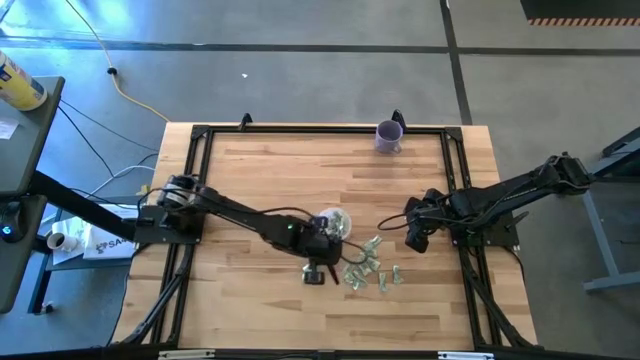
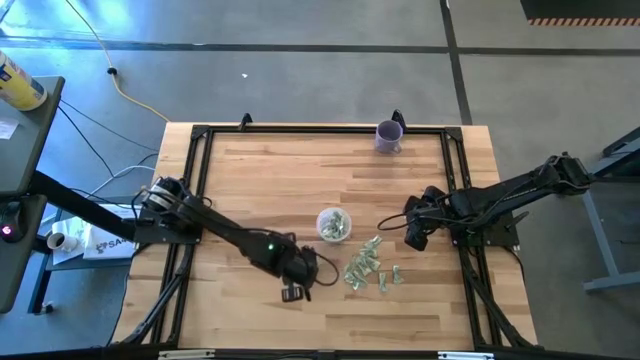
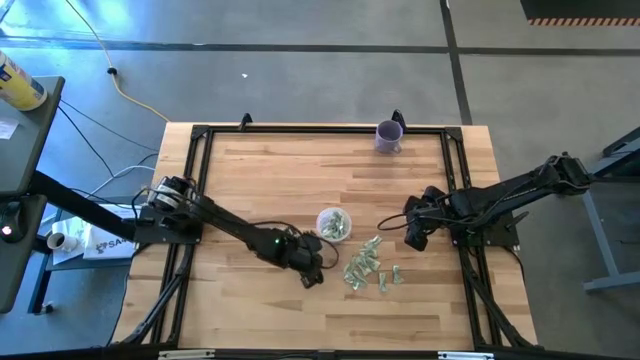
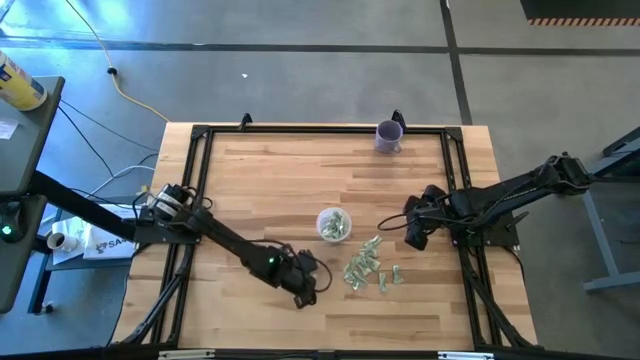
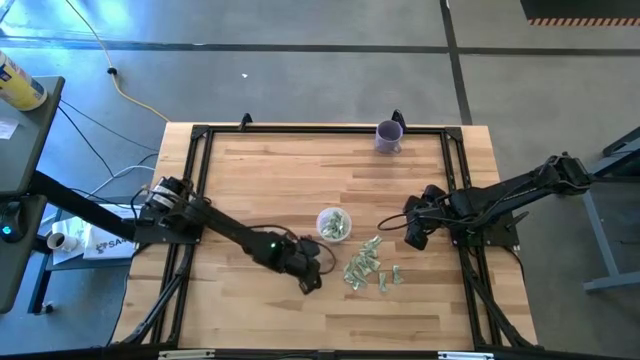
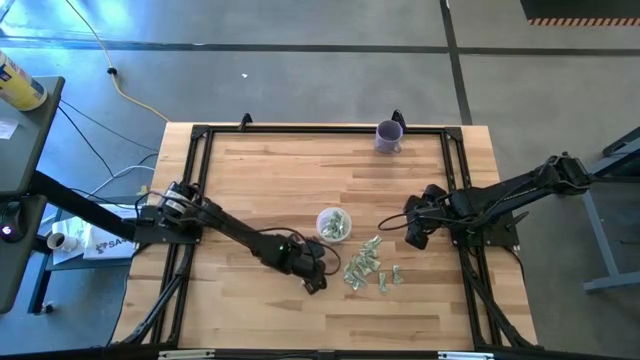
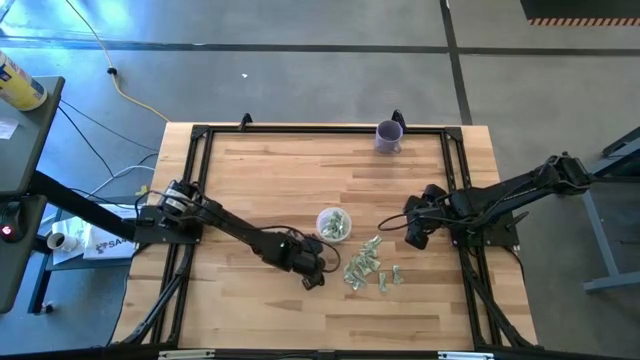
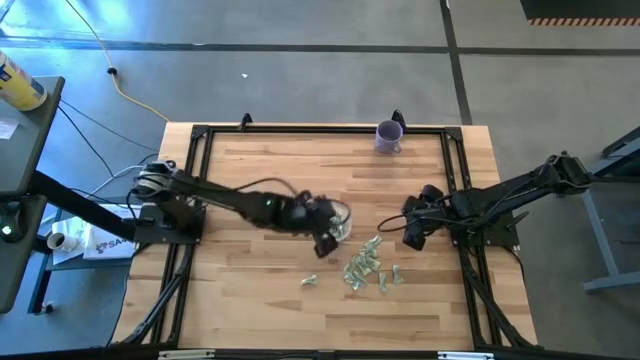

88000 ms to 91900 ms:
Task: Pick and place Stevia / Truvia into bins
Put the green stevia packet into the transparent bin

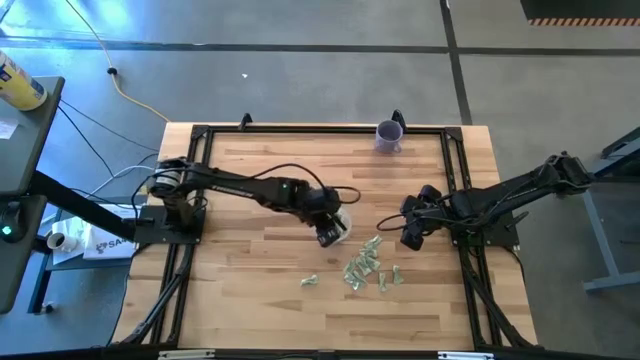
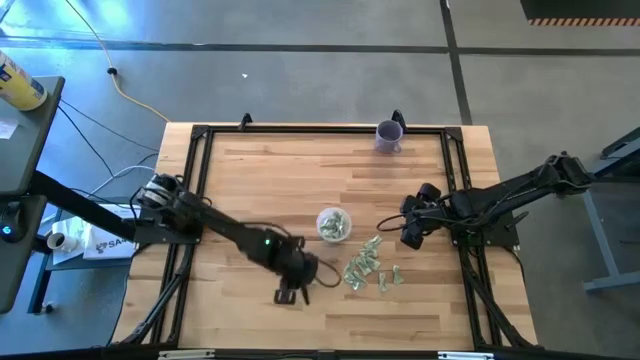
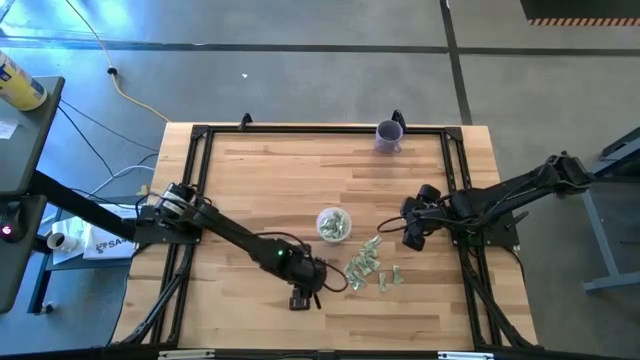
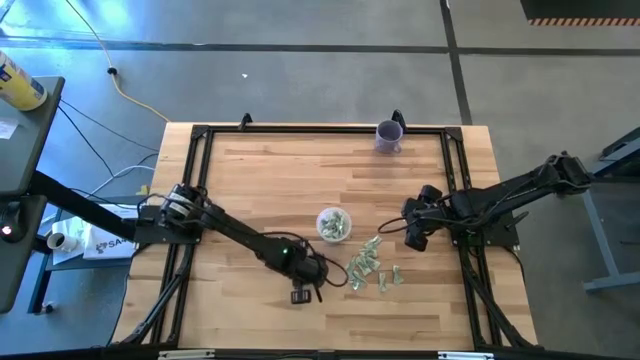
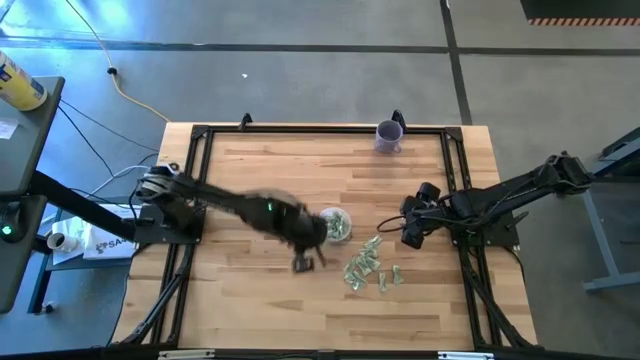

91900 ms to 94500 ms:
Put the green stevia packet into the transparent bin

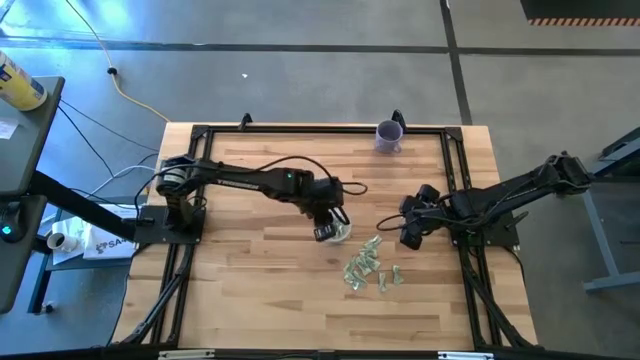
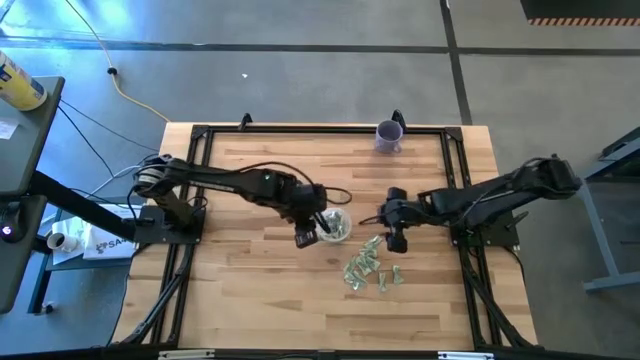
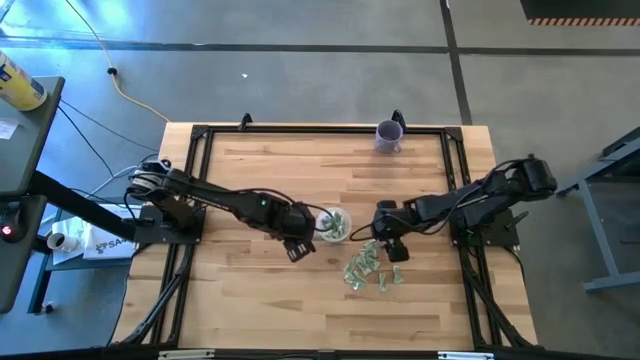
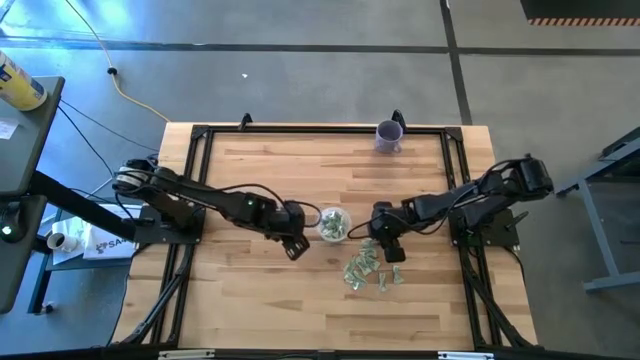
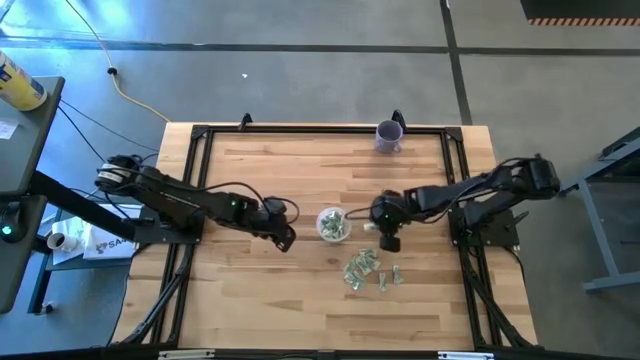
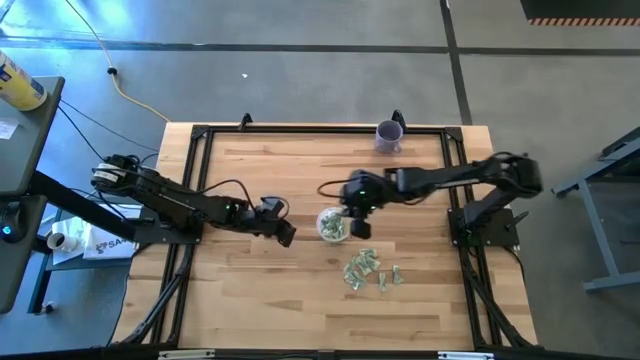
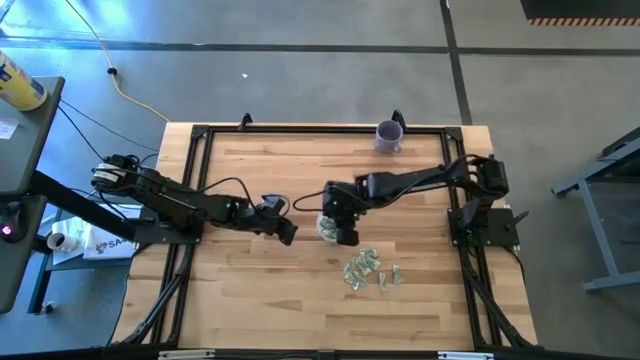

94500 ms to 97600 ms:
Put the green stevia packet into the transparent bin

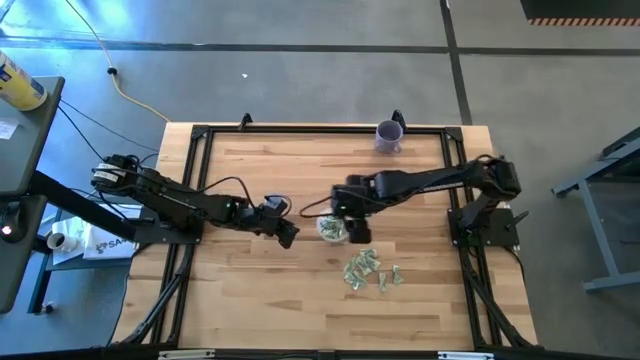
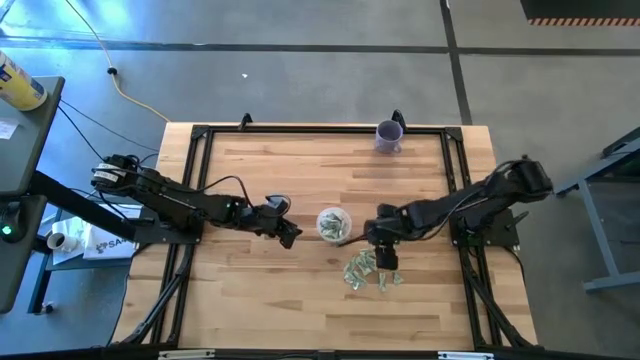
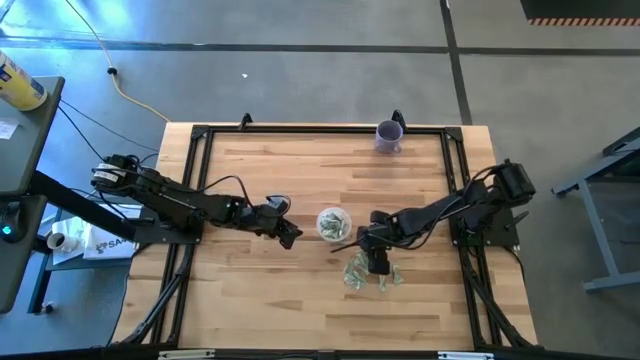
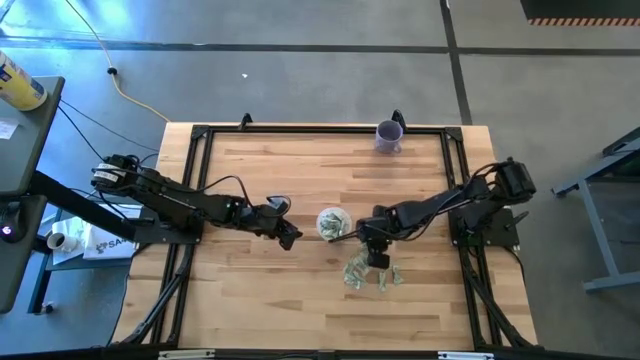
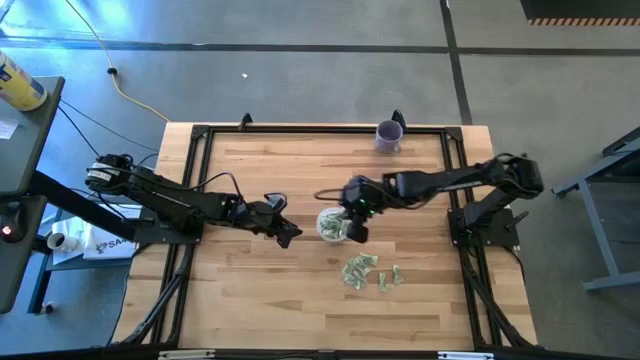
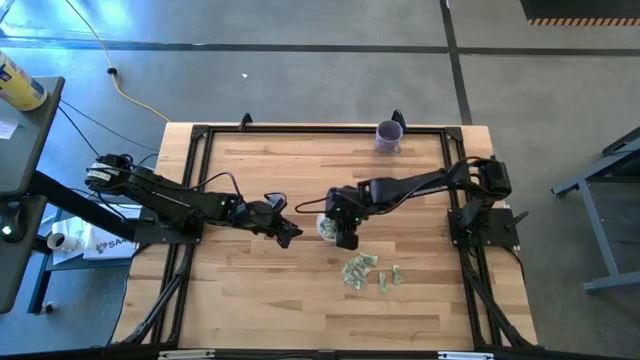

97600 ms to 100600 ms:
Put the green stevia packet into the transparent bin

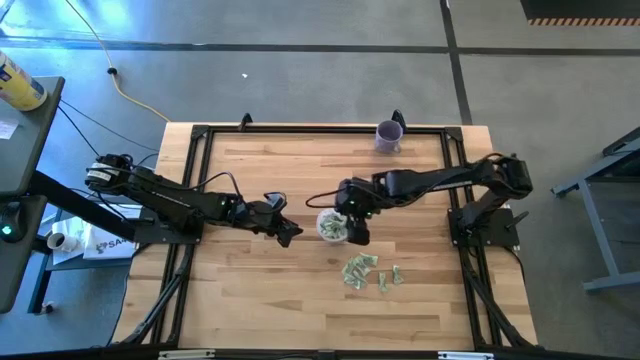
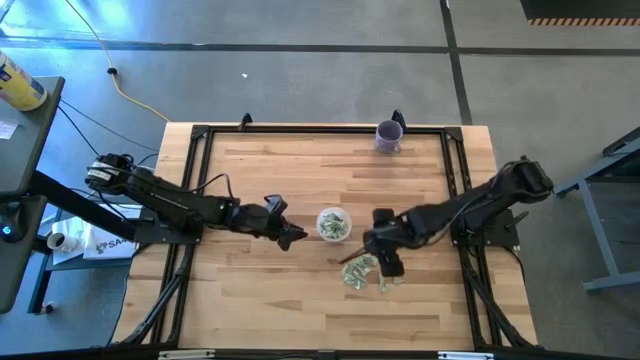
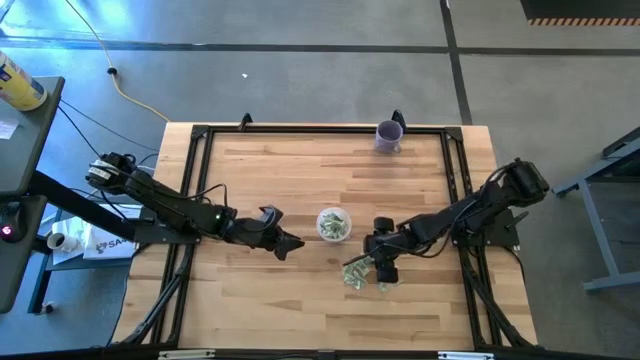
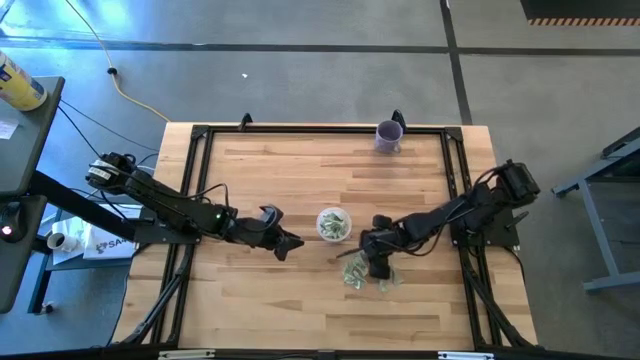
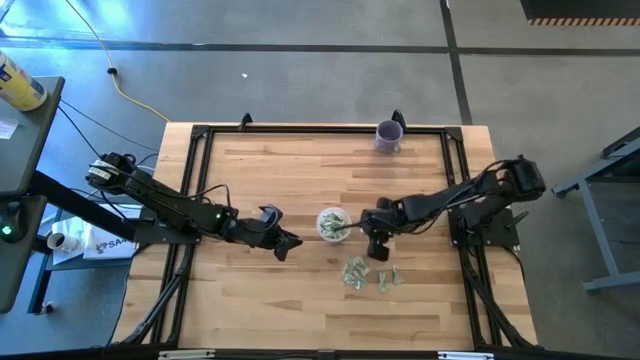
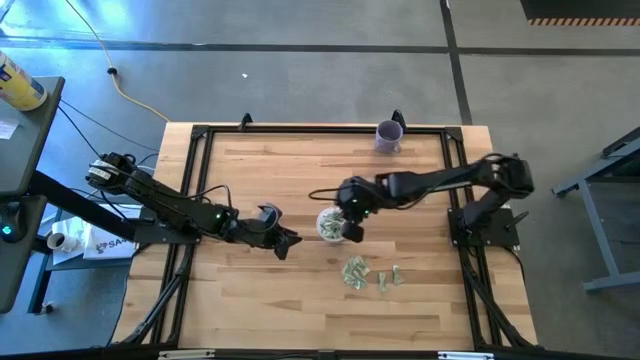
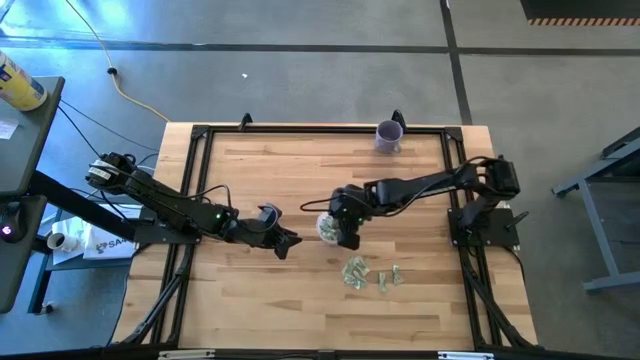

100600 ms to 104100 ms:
Put the green stevia packet into the transparent bin

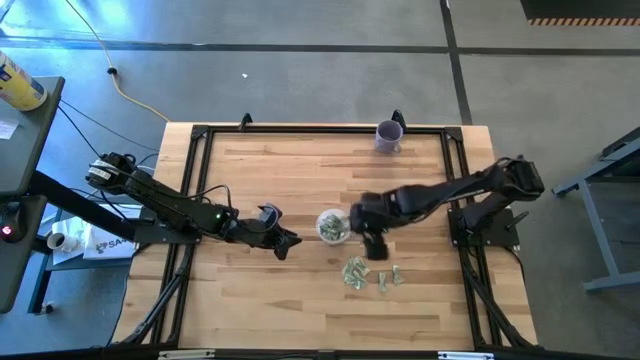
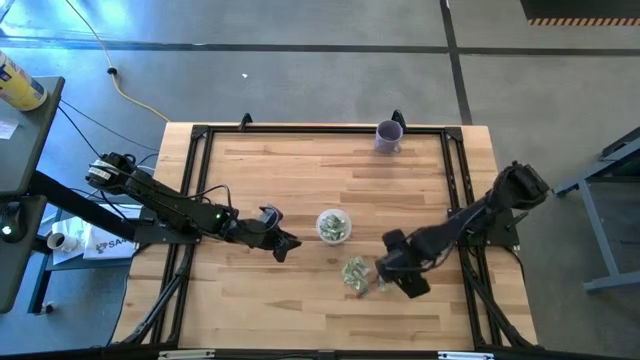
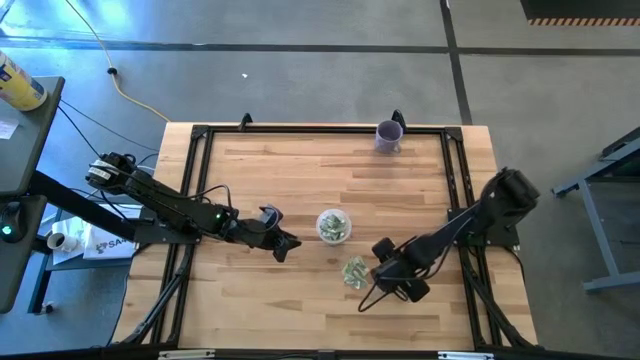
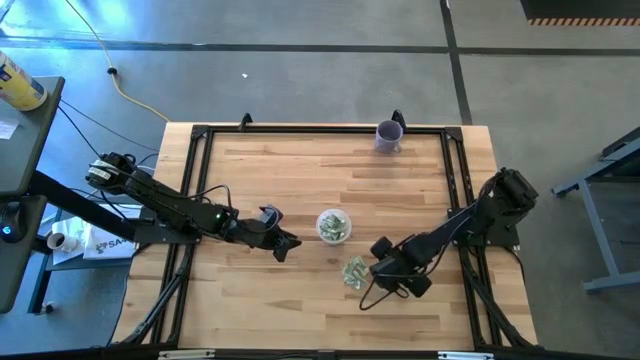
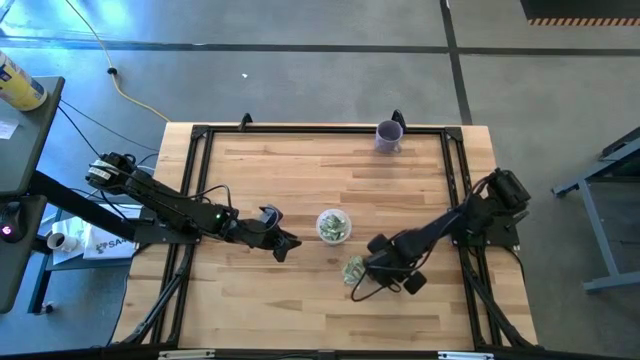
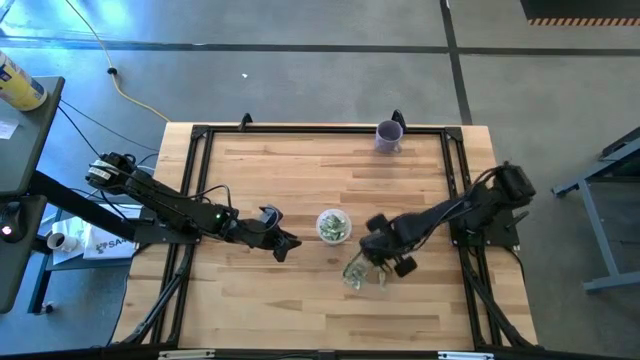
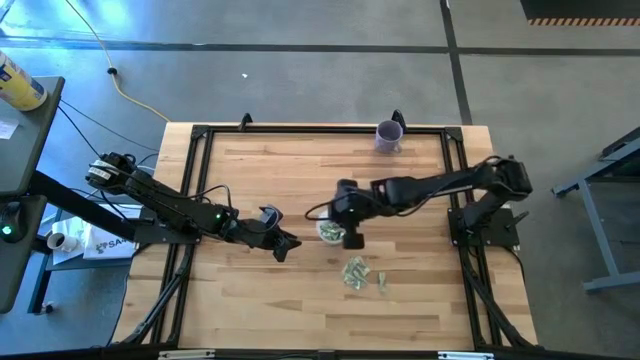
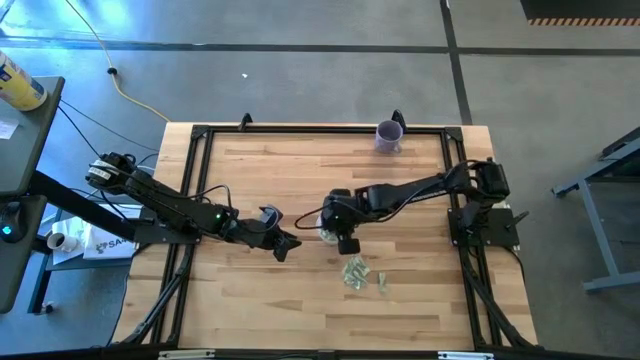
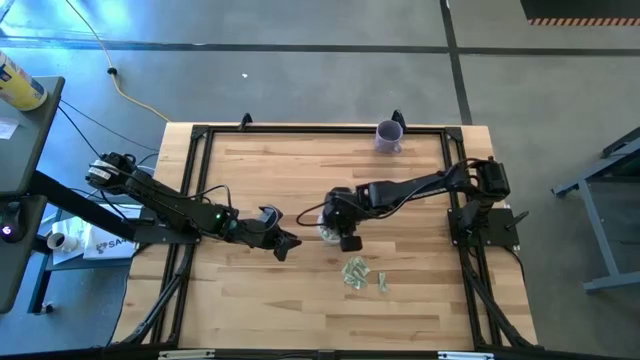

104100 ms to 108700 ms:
Put the green stevia packet into the transparent bin
